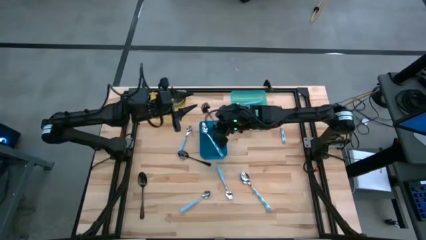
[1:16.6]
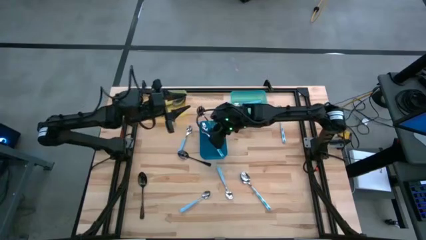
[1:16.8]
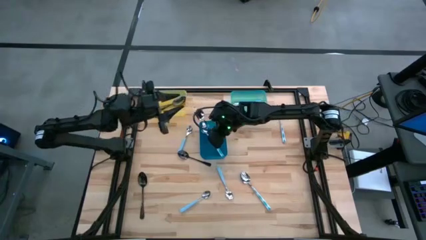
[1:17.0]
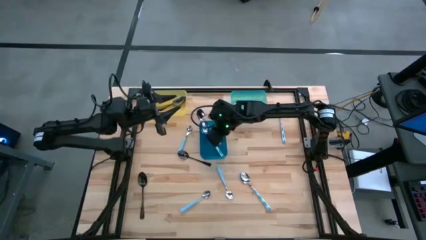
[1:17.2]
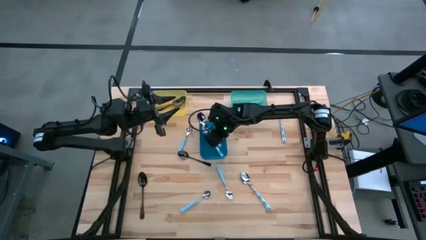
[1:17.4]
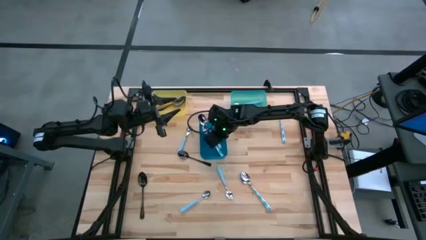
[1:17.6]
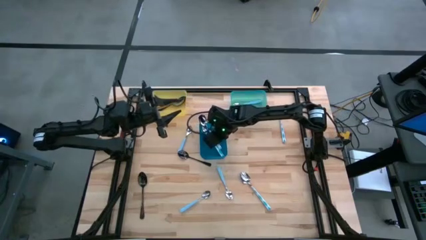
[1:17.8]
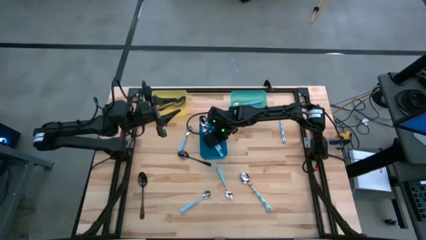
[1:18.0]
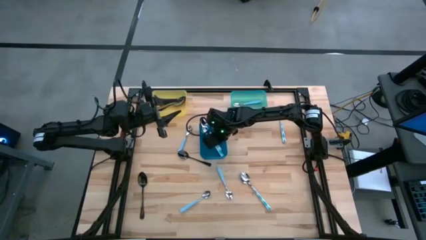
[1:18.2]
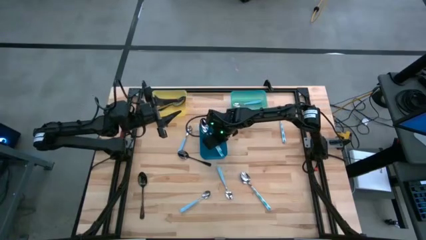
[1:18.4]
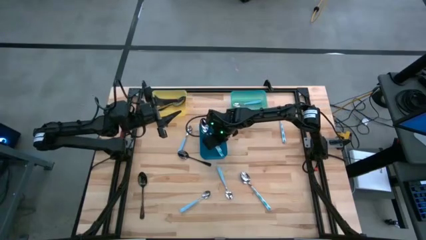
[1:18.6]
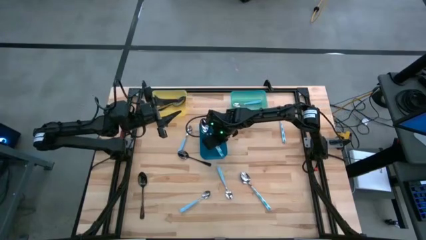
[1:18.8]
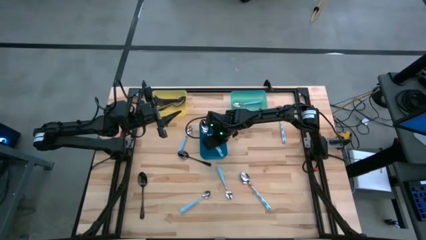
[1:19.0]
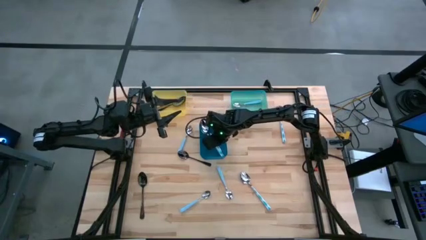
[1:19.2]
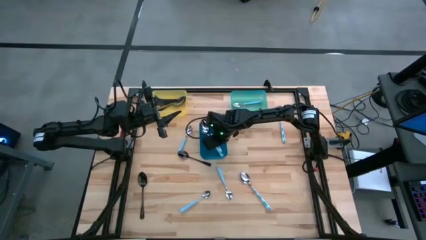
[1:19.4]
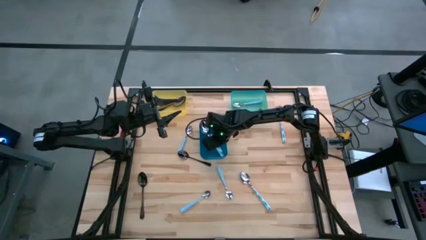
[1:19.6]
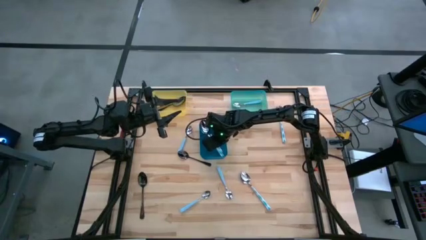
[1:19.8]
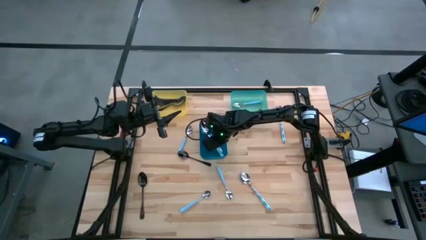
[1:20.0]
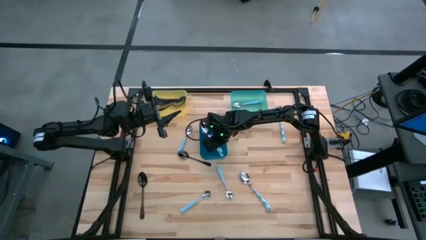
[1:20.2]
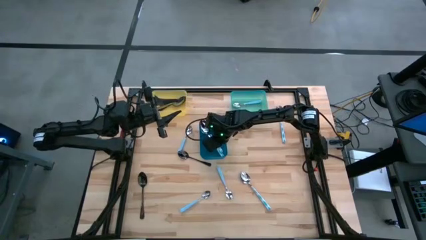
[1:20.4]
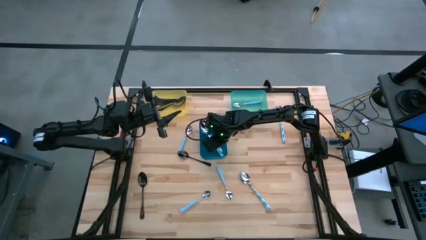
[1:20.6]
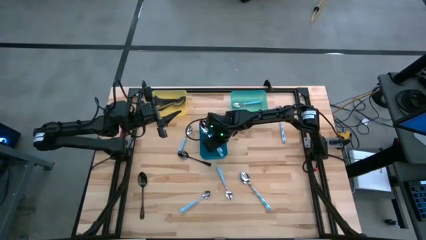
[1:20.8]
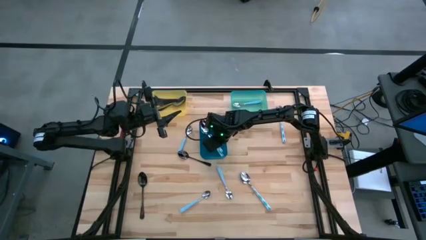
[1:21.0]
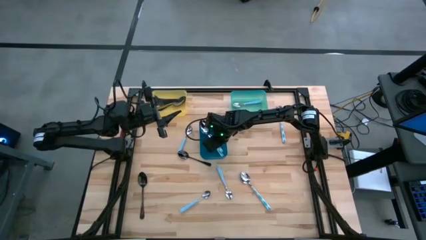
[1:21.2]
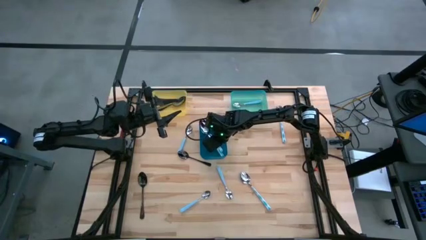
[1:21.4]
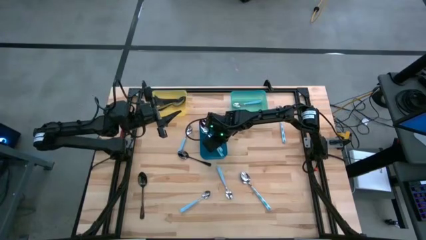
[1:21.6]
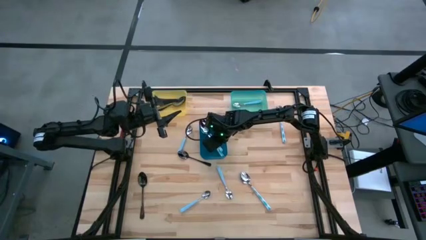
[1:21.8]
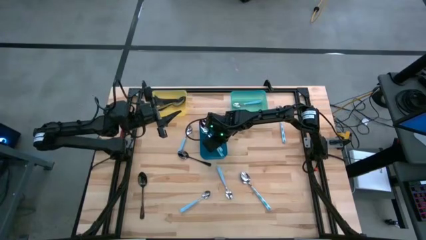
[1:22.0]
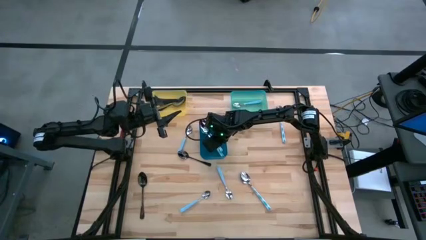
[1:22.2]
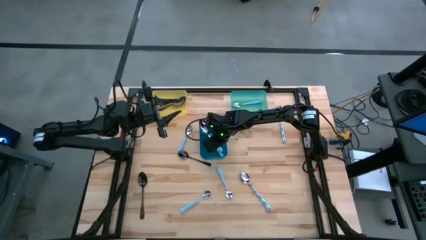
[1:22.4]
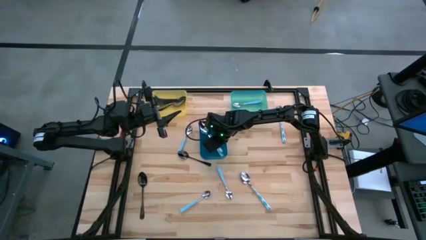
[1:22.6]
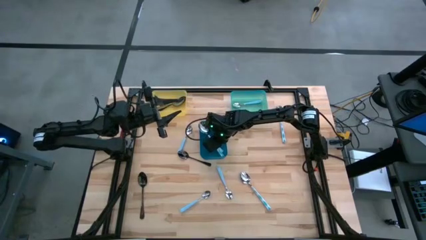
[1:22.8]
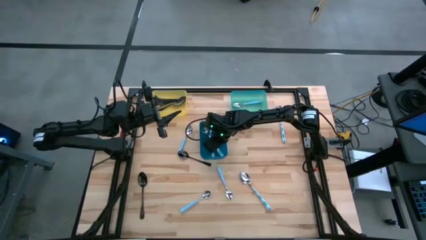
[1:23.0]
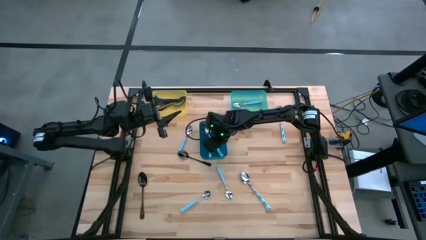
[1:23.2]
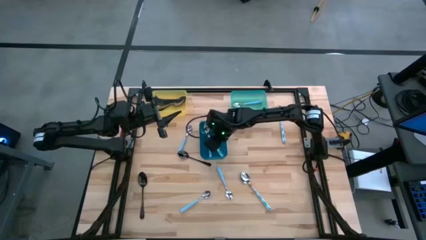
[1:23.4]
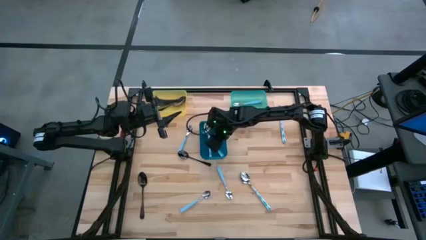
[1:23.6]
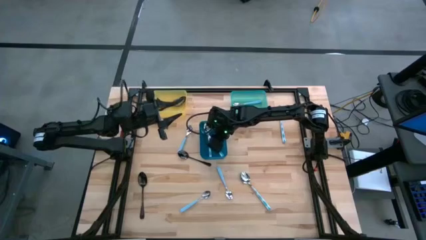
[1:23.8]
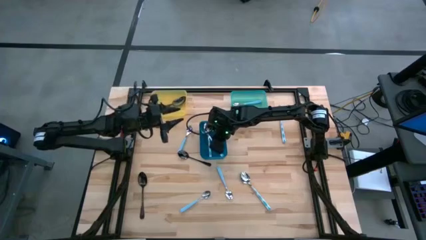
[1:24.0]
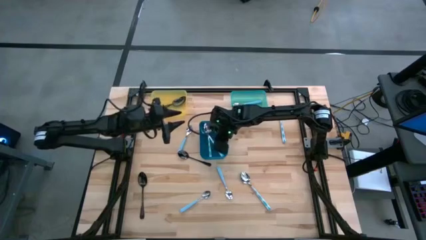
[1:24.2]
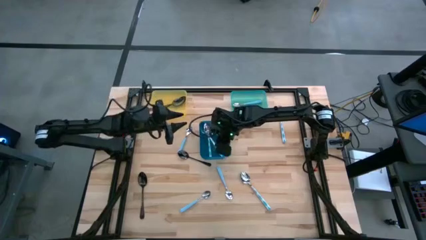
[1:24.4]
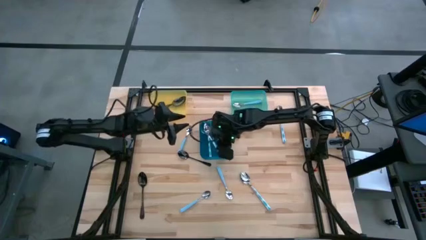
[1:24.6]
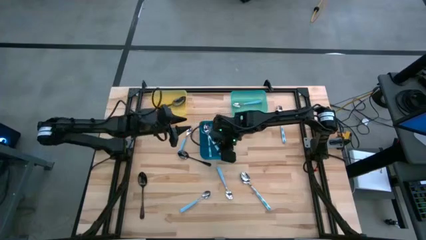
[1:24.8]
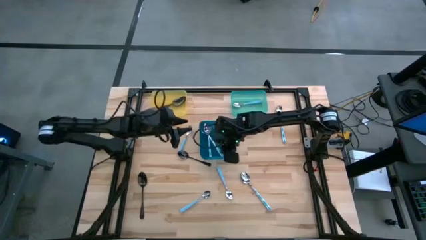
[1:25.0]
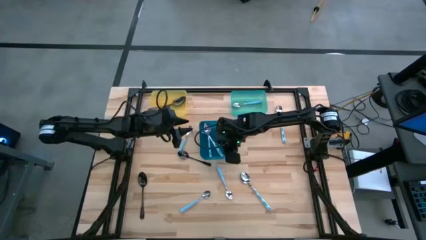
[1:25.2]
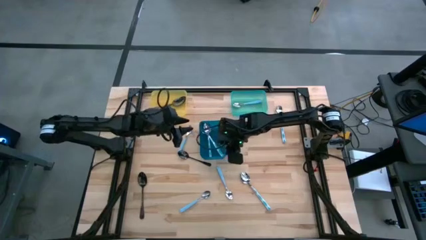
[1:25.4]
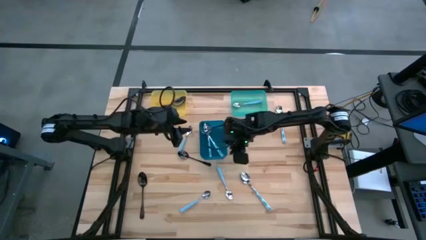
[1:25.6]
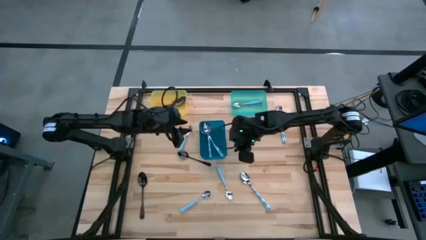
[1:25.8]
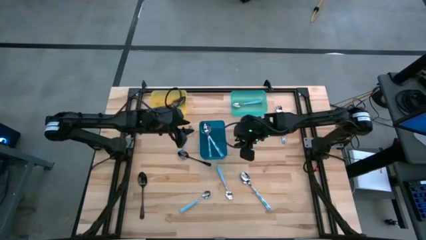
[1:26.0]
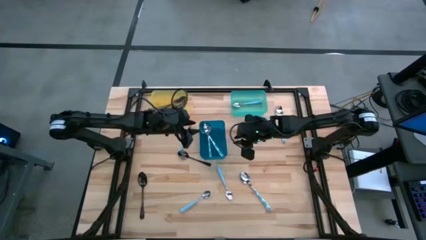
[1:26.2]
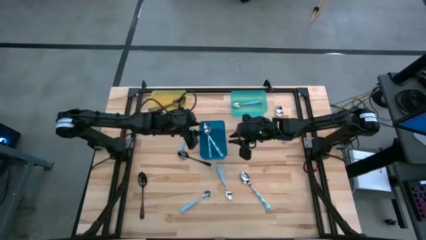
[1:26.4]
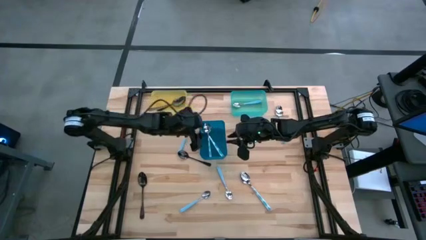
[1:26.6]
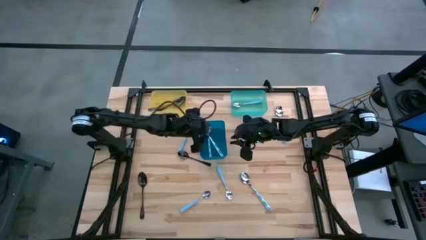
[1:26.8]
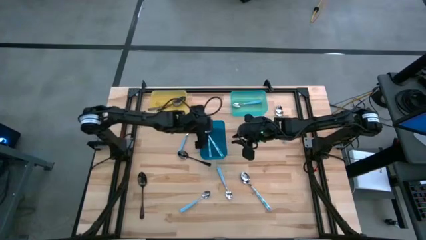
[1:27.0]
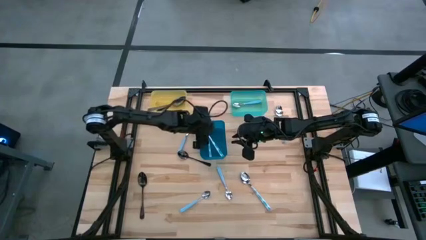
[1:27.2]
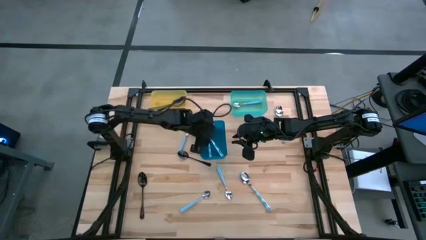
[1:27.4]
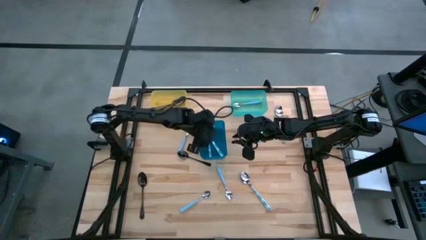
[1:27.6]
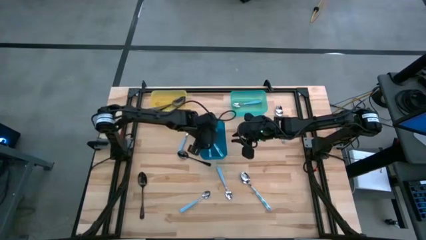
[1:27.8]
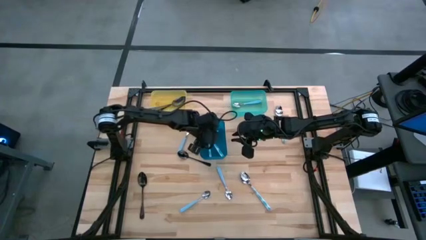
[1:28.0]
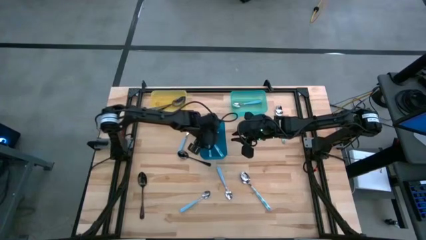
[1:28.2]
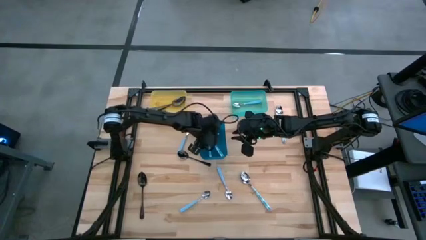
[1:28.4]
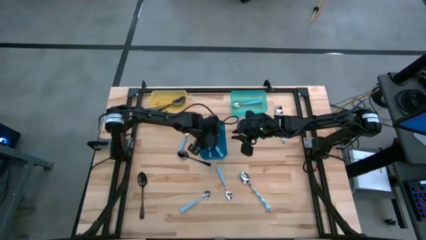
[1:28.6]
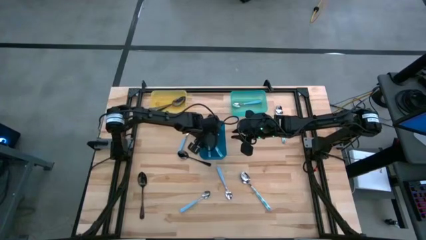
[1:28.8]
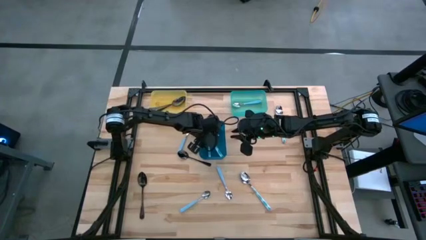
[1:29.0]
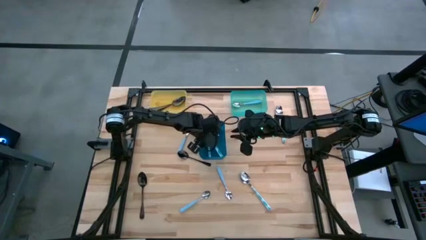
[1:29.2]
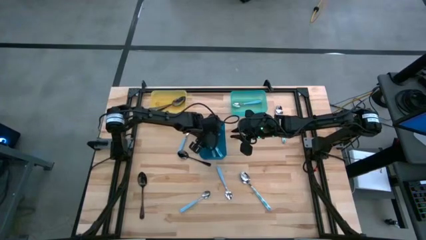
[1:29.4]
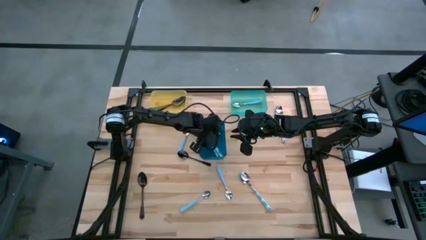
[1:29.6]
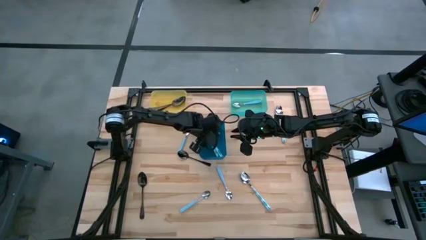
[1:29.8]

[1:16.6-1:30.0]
Task: Sort silverware by color (type)
Put the white patterned spoon into the blue bin
